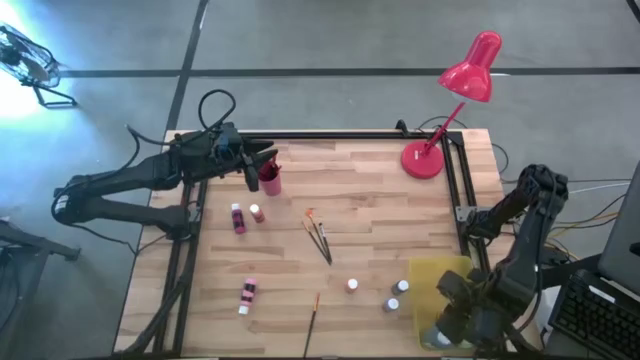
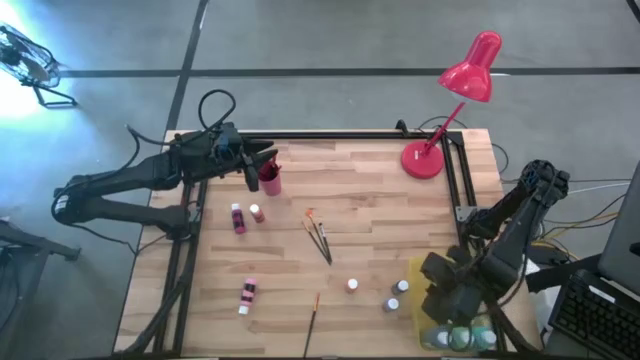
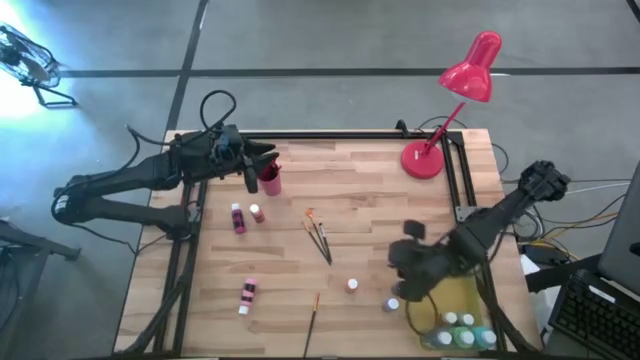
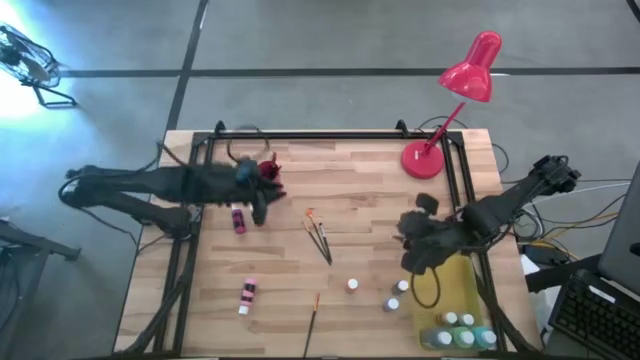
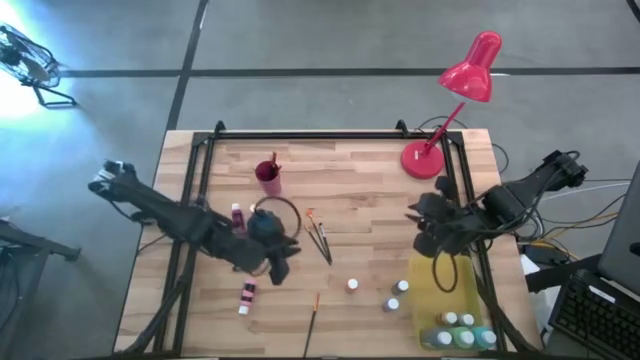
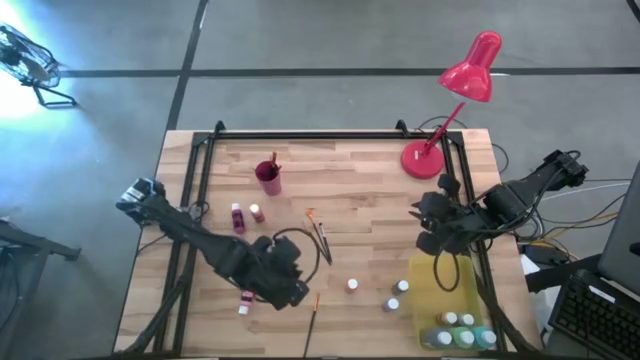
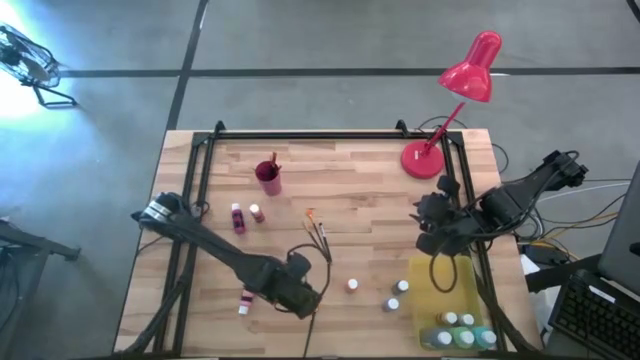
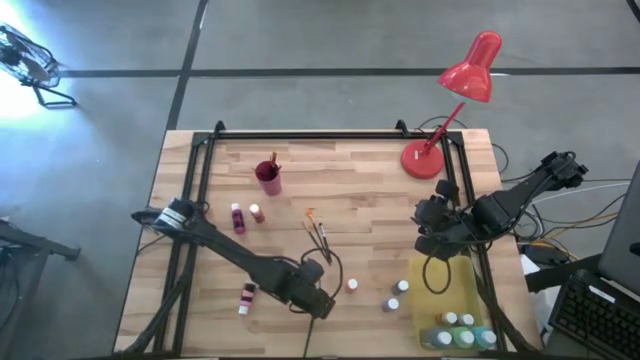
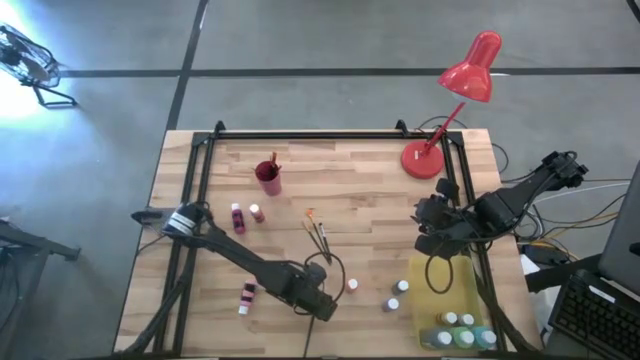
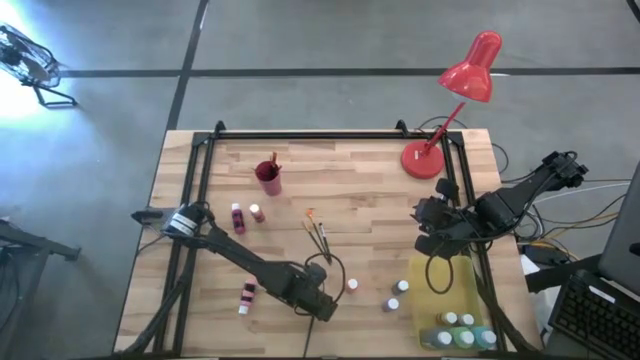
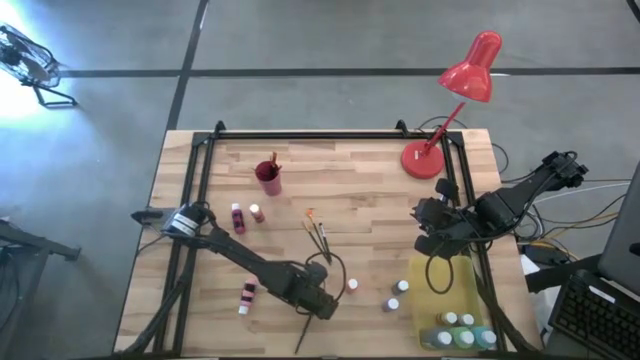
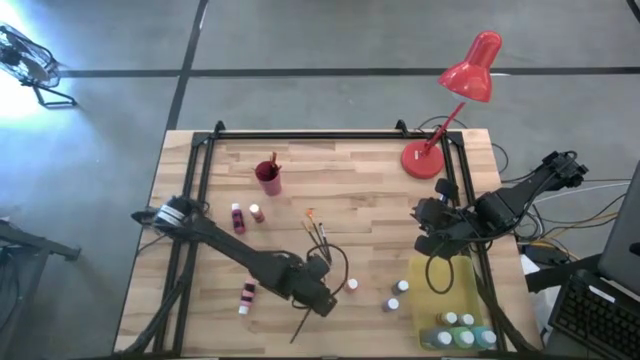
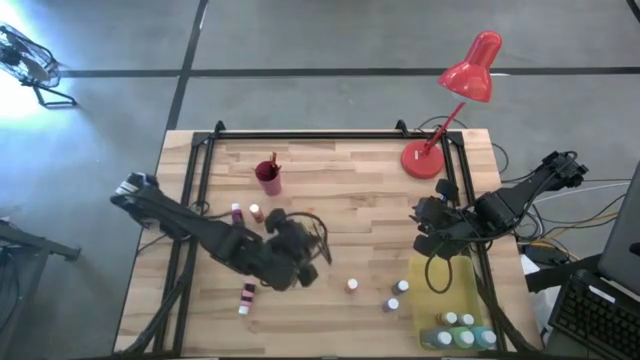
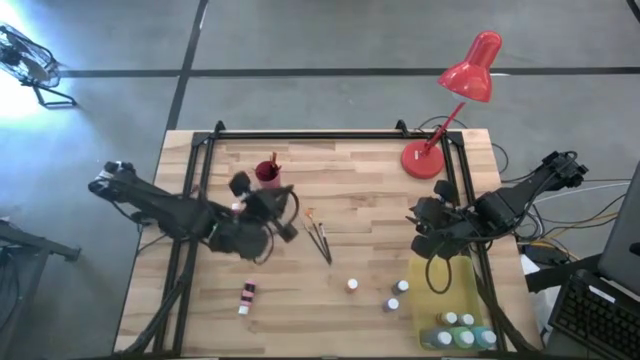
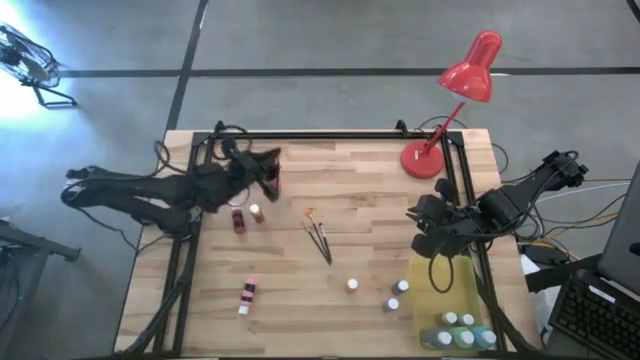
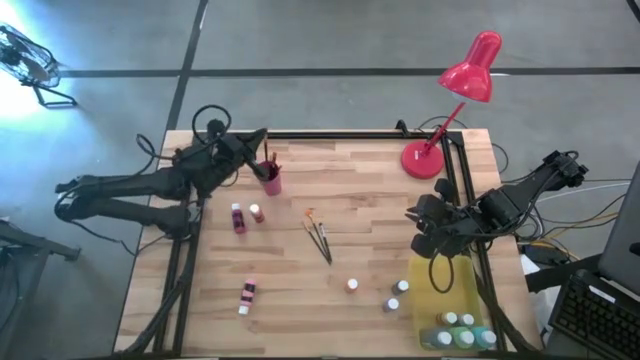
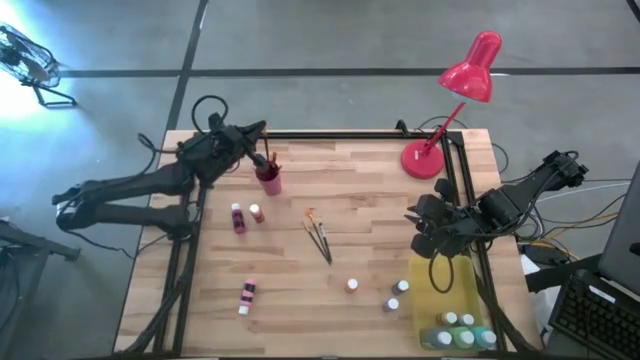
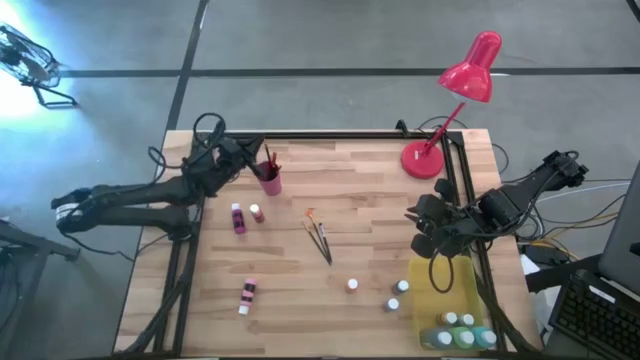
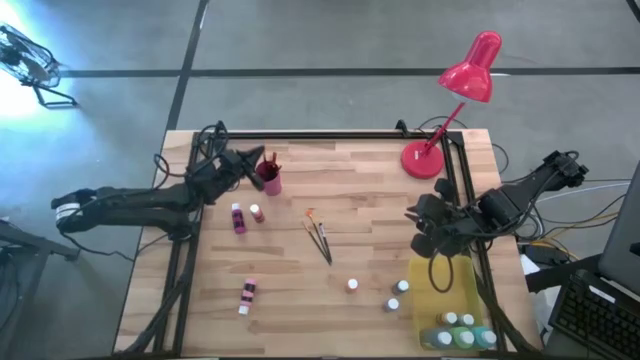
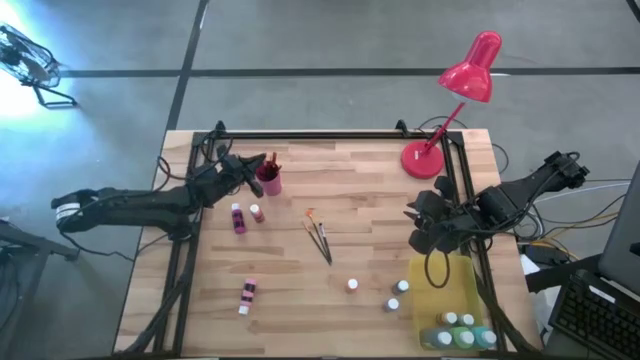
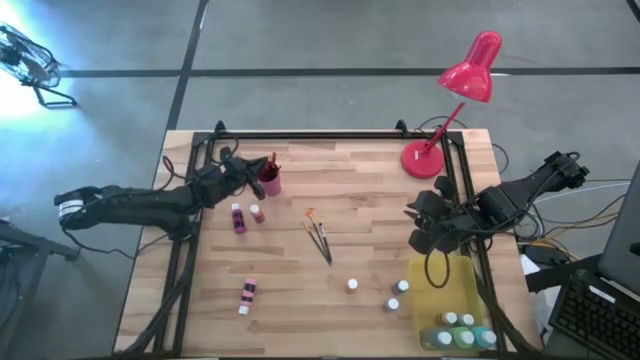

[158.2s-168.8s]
Task: Pick & Place Paint Supplies
Put the black paint brush into the pink cup

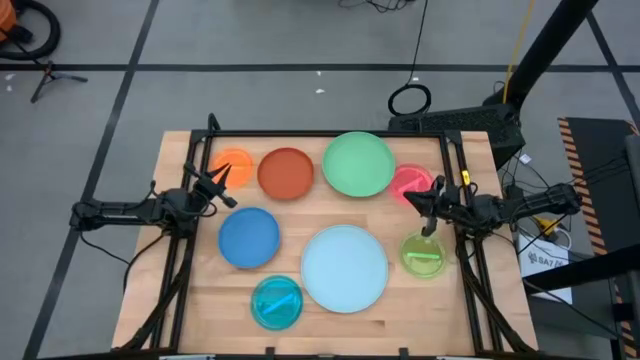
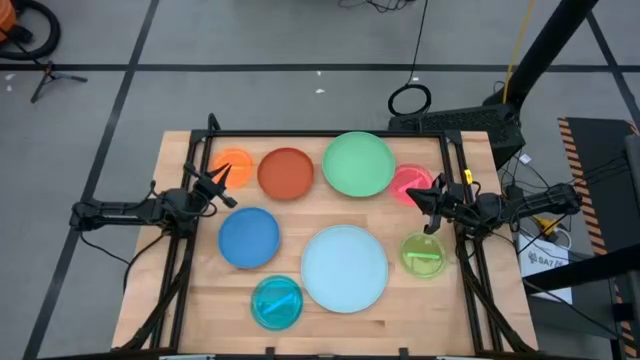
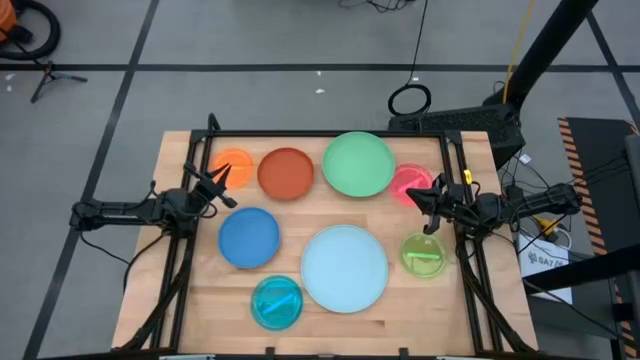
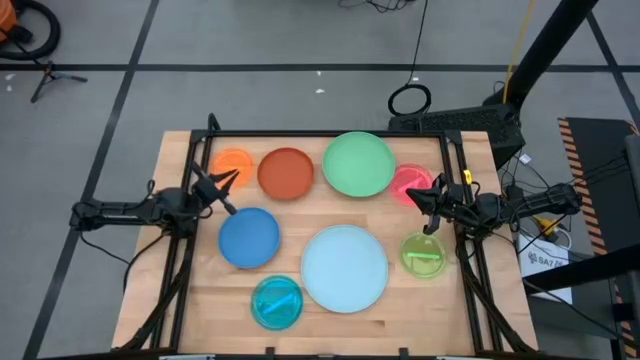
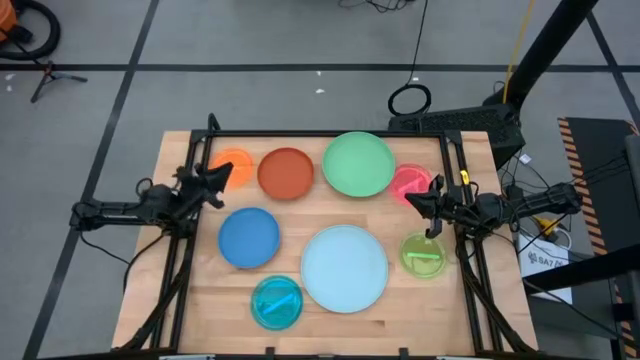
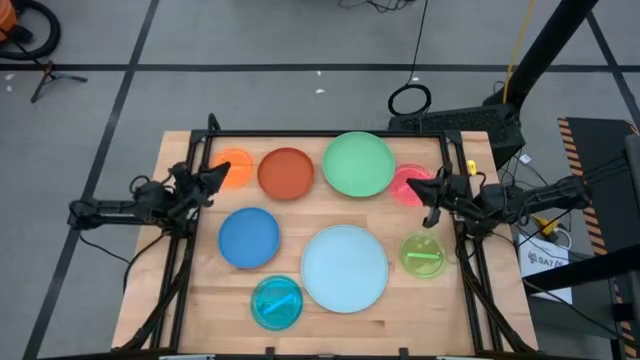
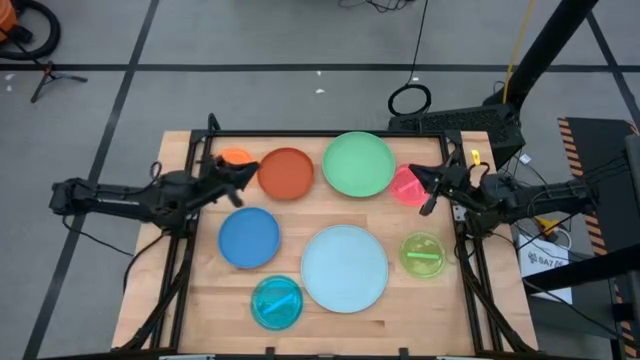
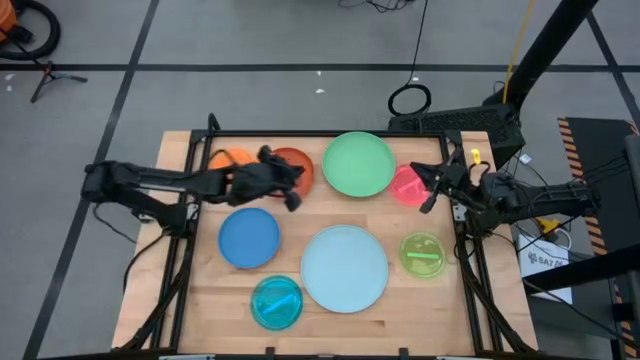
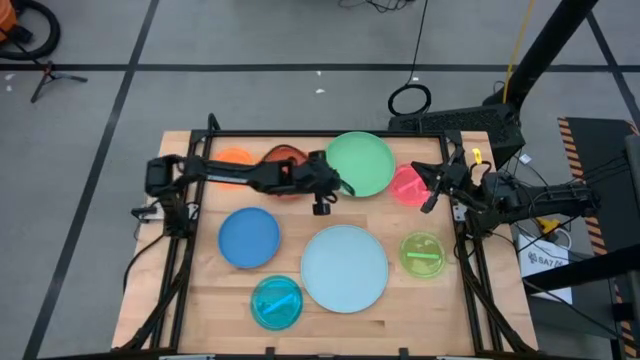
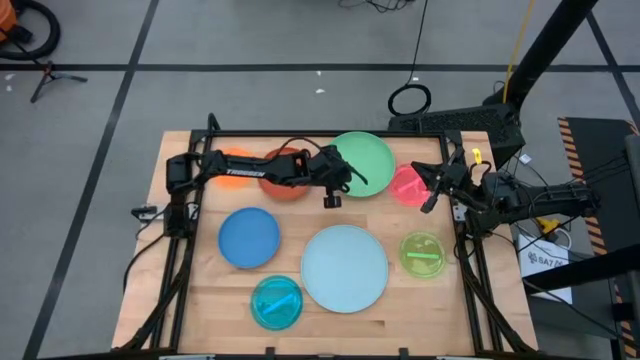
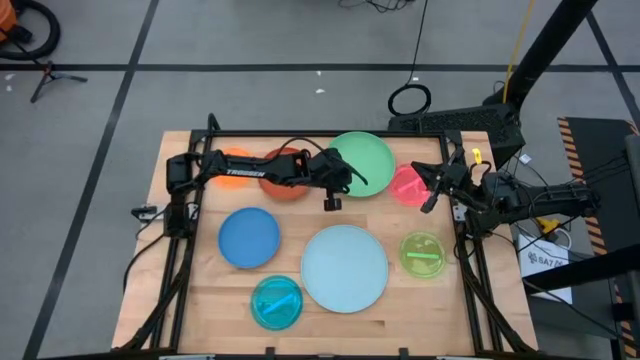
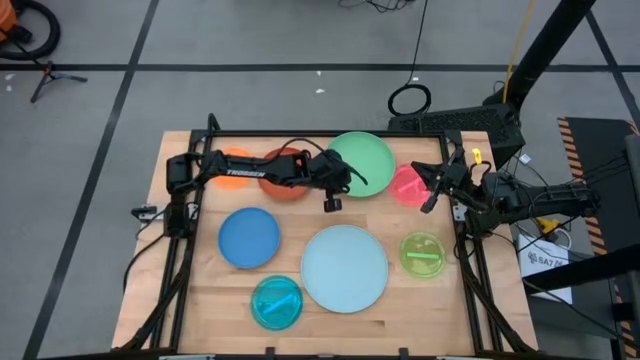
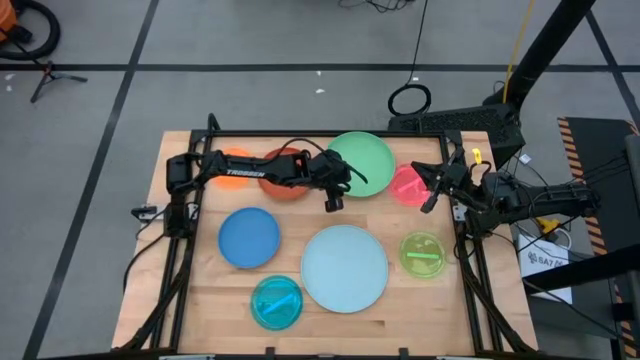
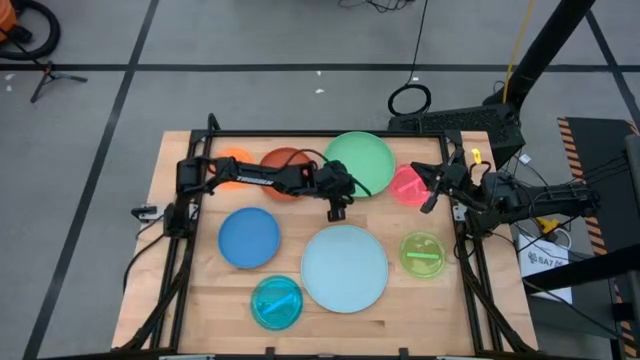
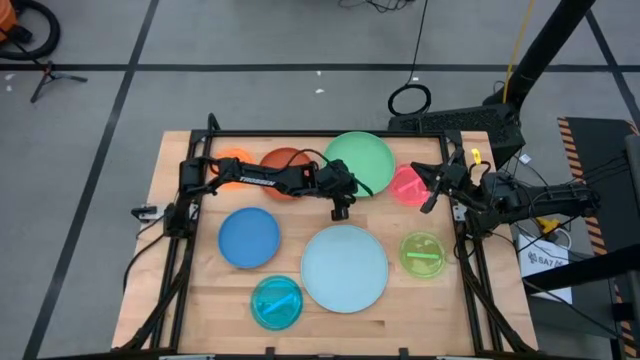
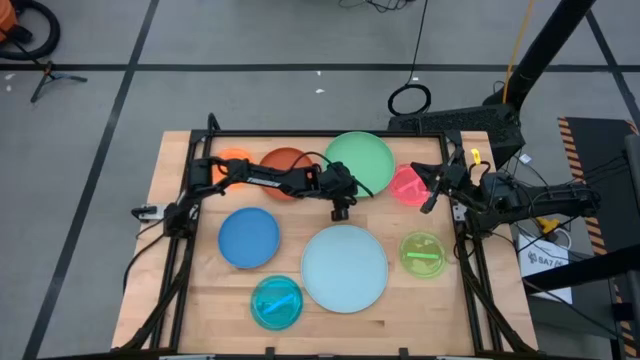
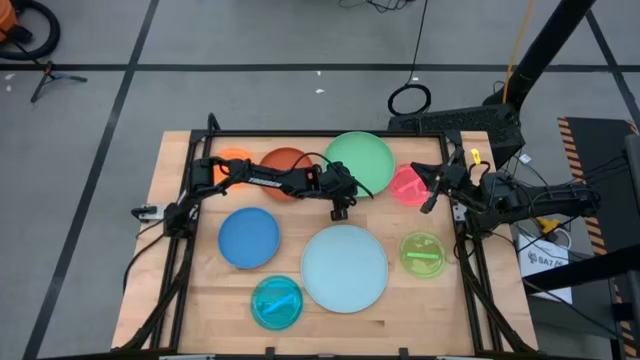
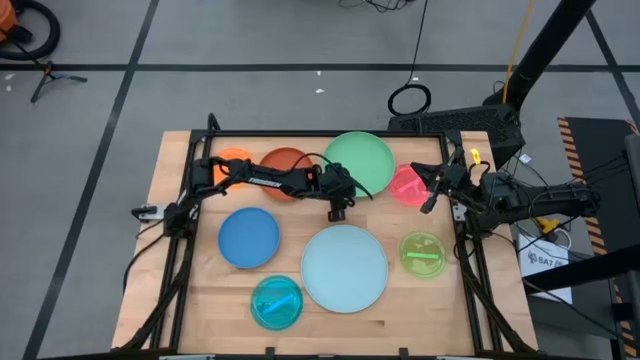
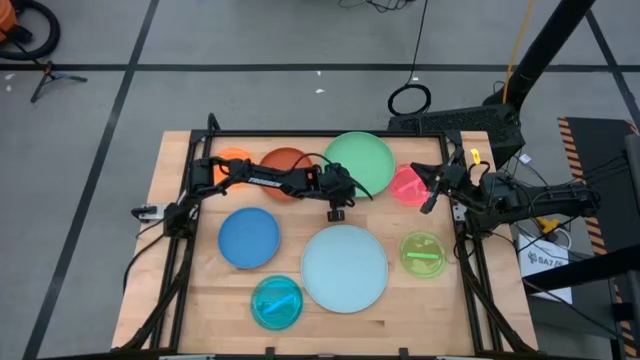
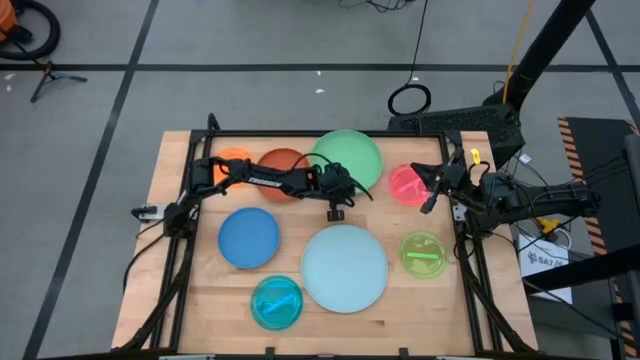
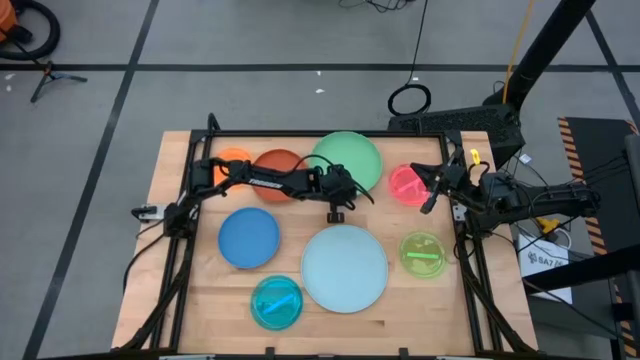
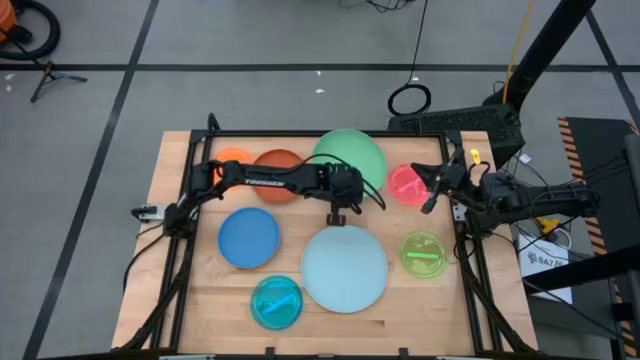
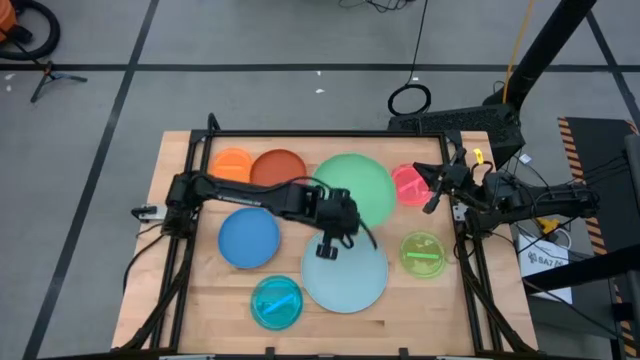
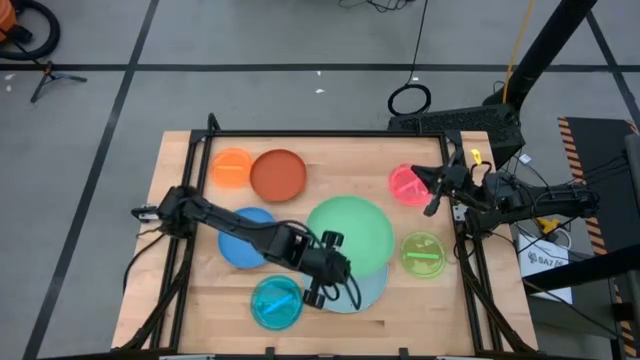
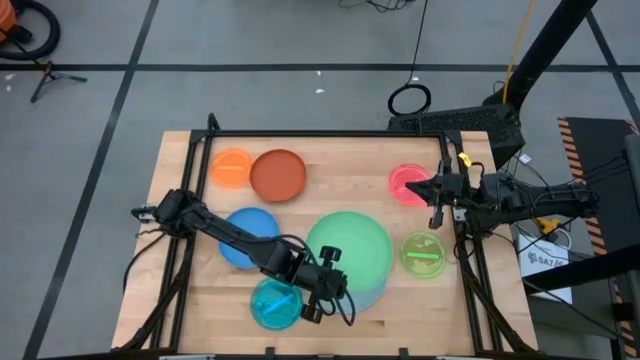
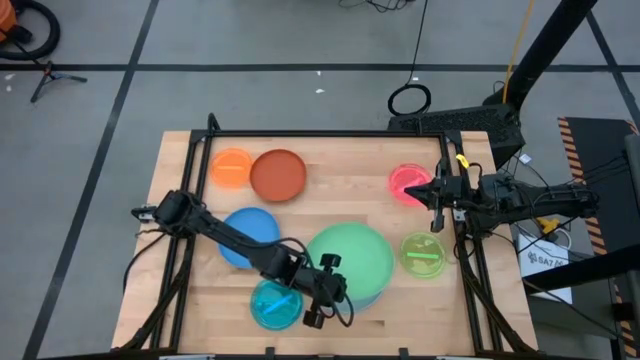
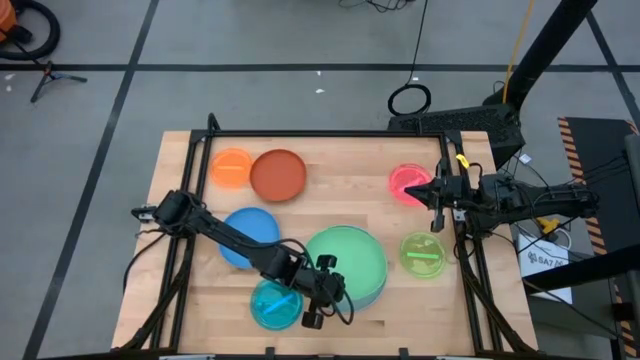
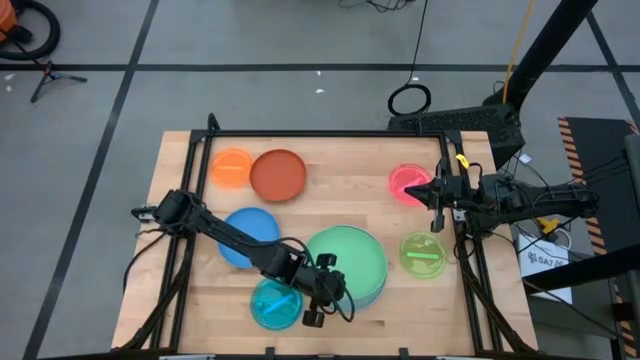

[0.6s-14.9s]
Task: Stack plastic plates
Stack the green plate on the light blue plate
